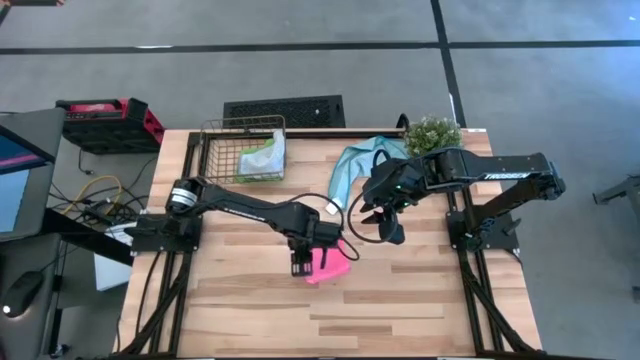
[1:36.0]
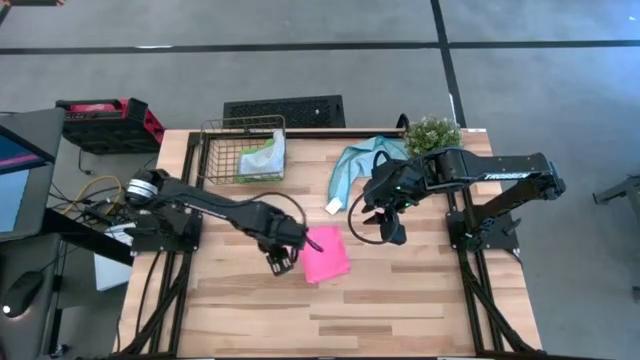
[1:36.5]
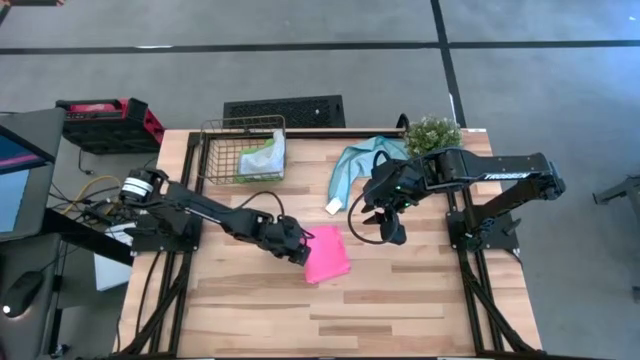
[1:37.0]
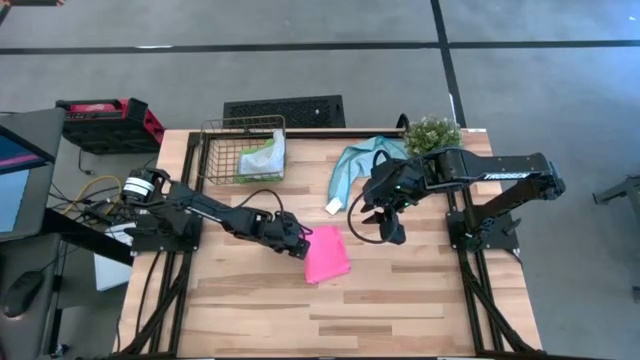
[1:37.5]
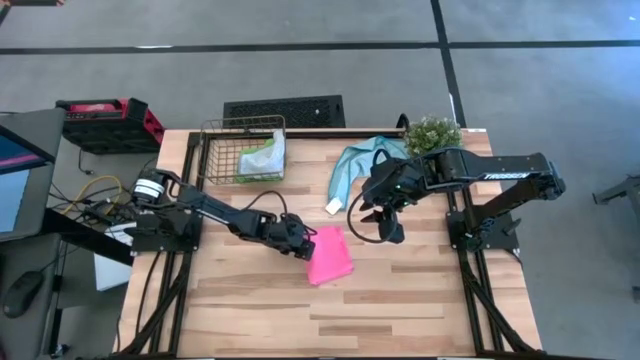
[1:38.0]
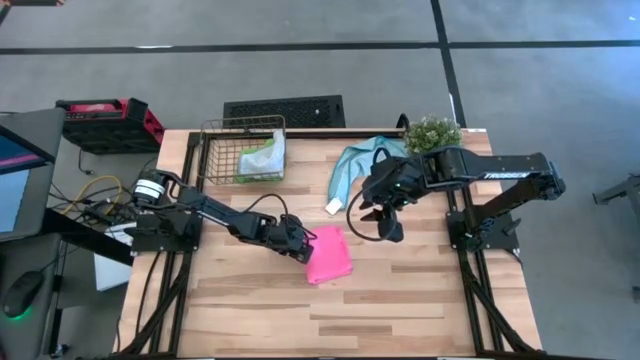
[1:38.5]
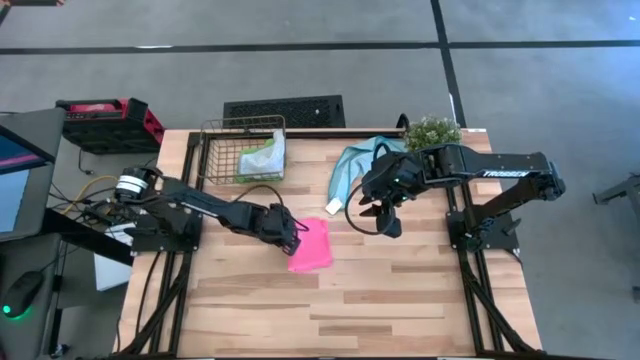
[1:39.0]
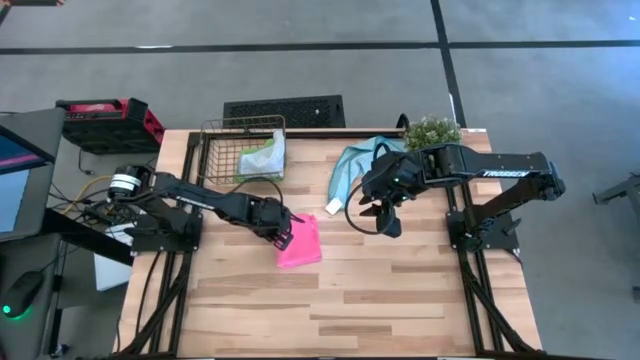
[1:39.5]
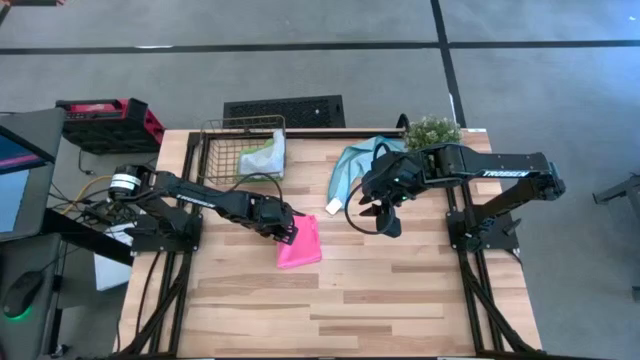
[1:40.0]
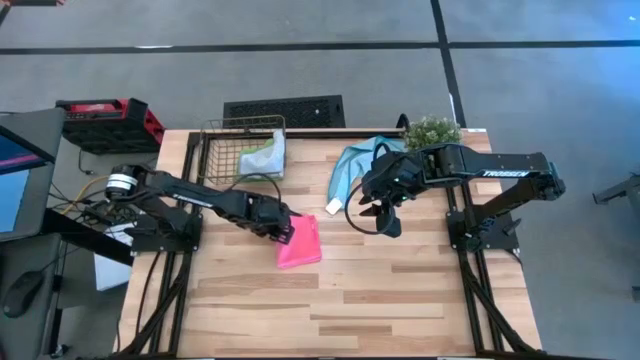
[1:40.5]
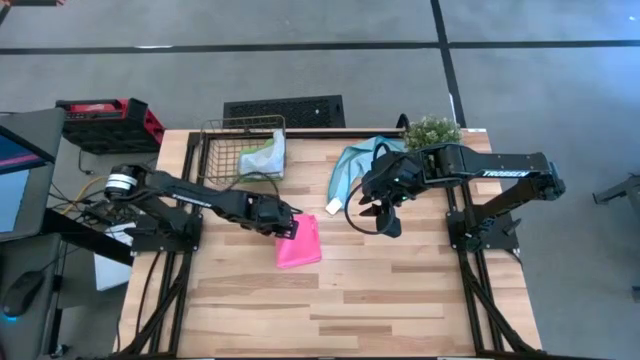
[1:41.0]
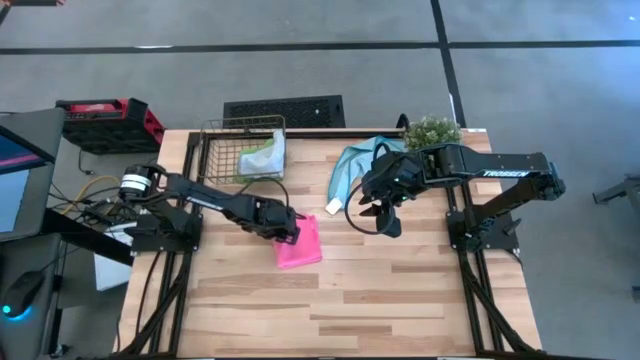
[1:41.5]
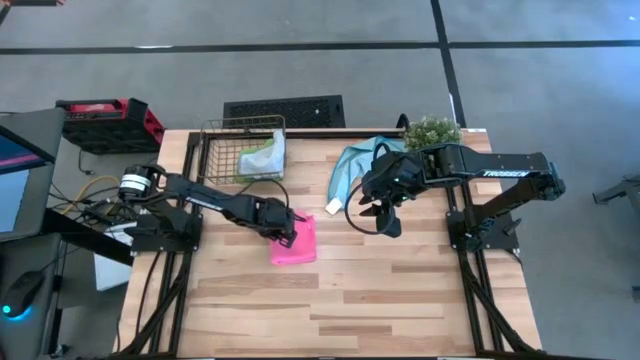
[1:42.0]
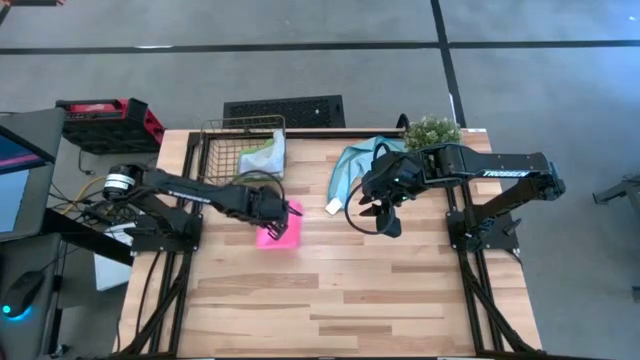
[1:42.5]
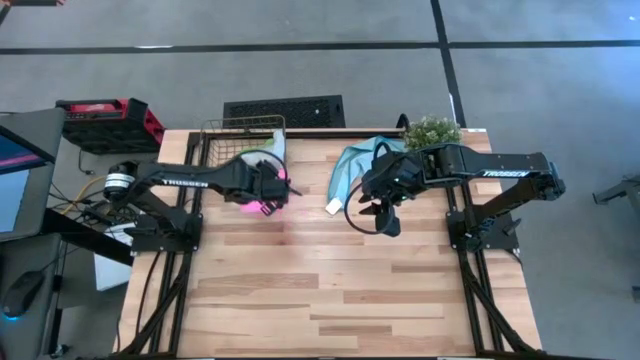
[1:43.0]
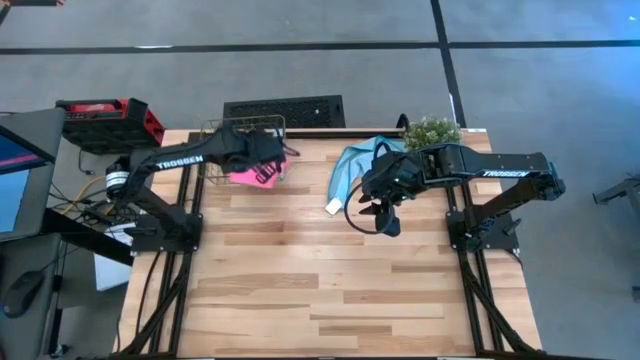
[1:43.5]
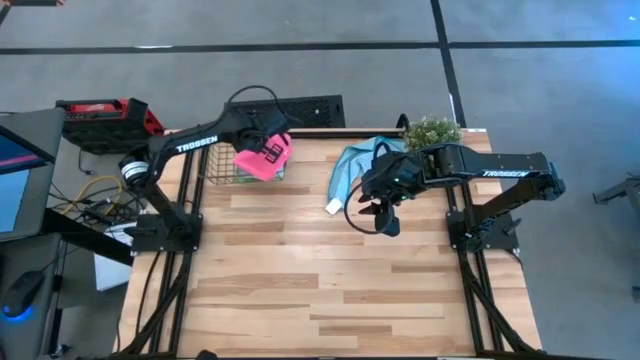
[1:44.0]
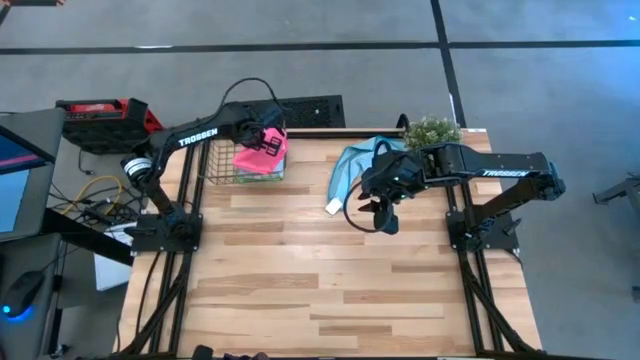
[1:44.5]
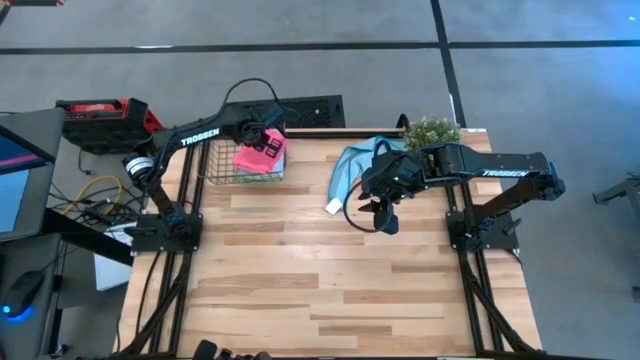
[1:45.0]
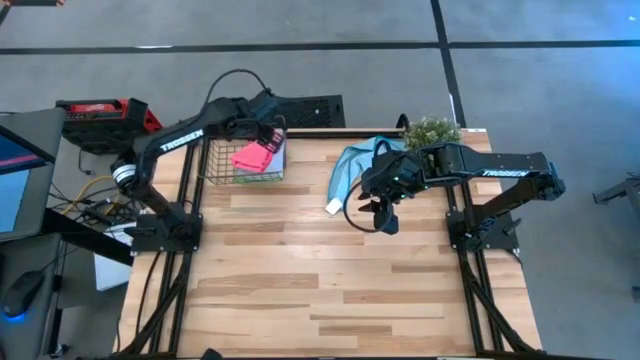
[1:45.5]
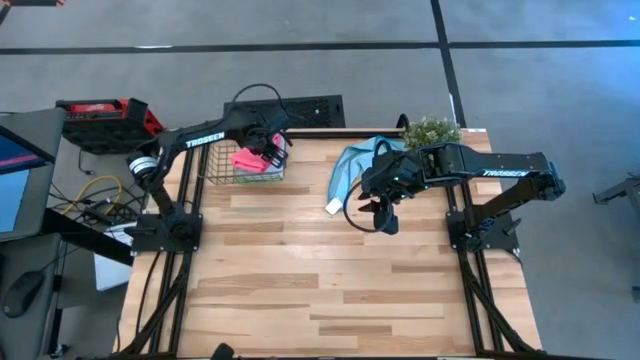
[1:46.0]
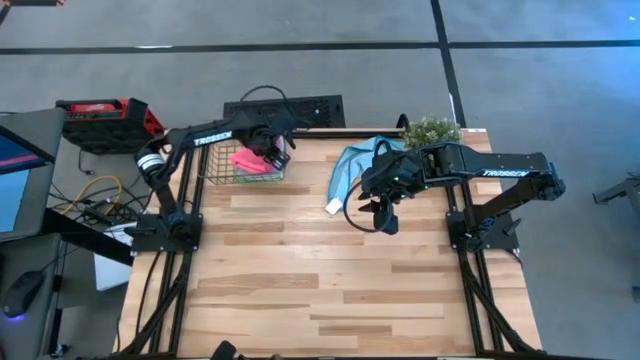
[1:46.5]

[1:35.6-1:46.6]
Task: Fold microfiber towels
Put the pink microfiber cloth into the gold wire basket

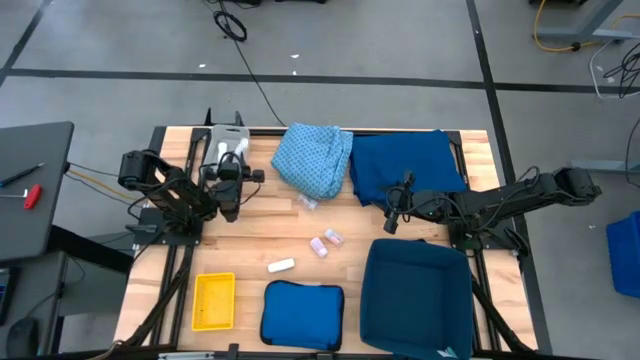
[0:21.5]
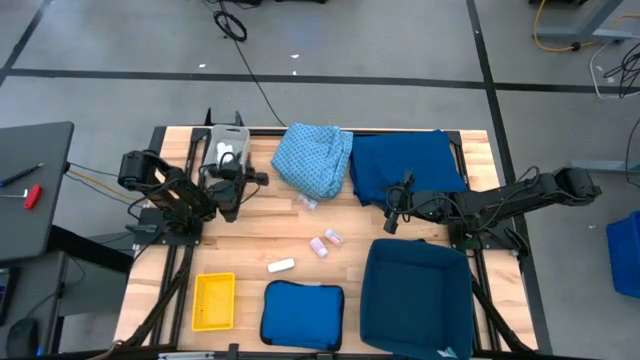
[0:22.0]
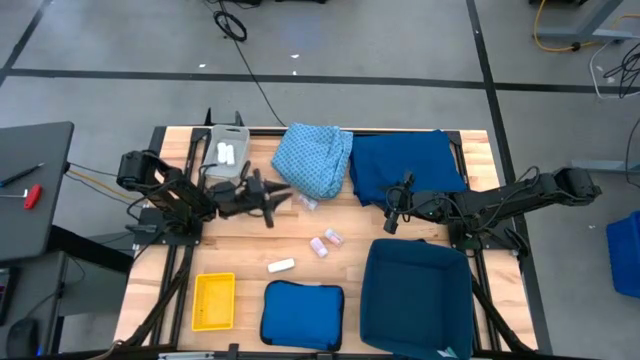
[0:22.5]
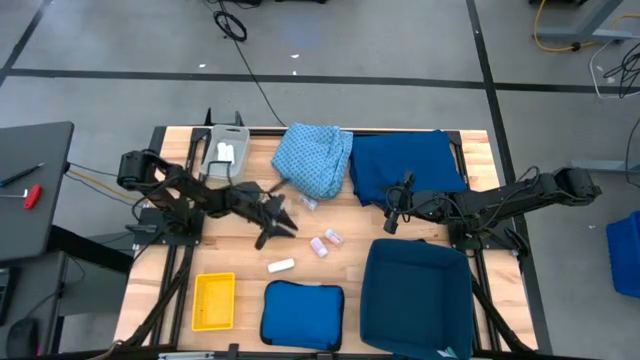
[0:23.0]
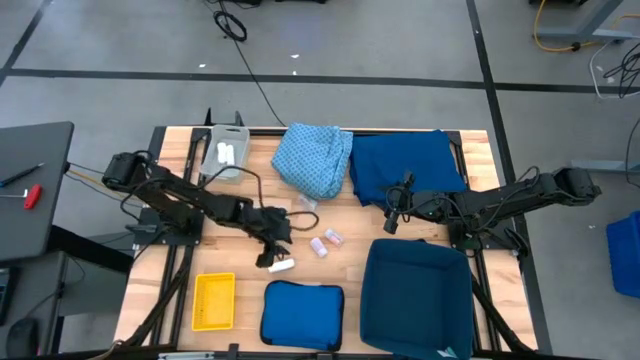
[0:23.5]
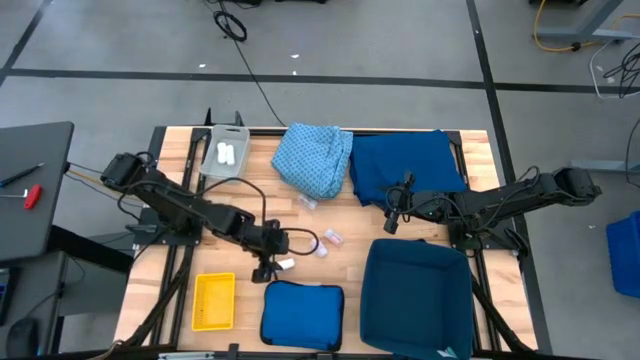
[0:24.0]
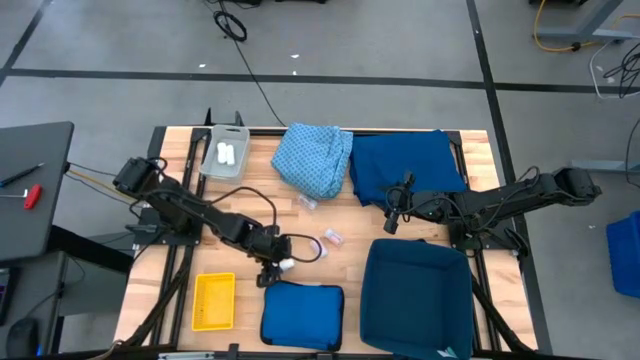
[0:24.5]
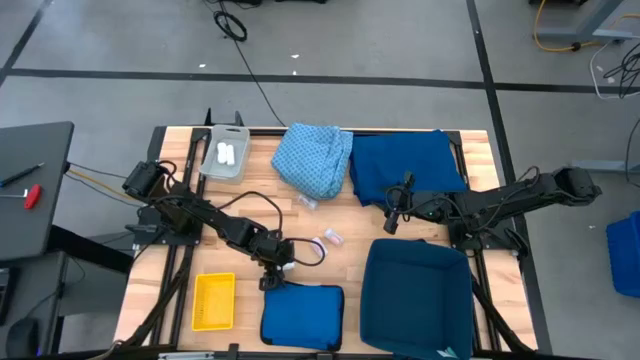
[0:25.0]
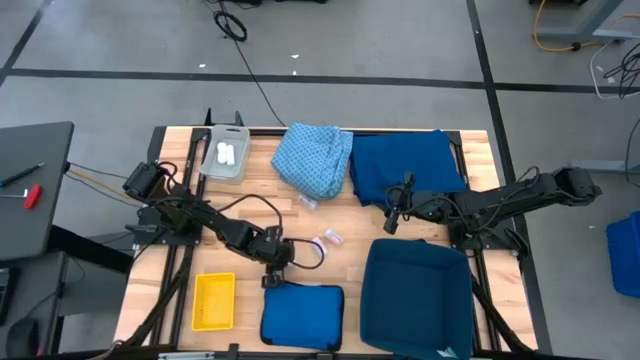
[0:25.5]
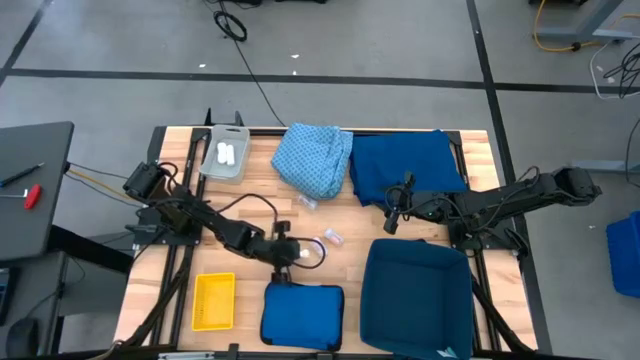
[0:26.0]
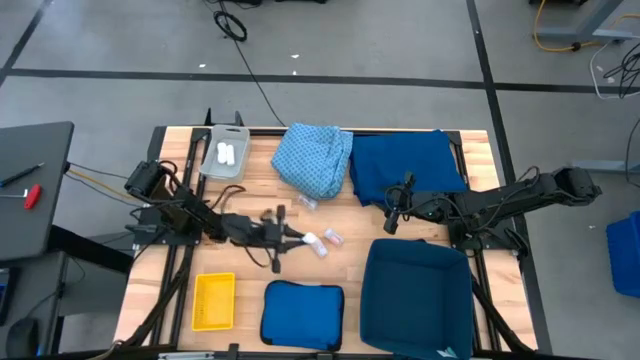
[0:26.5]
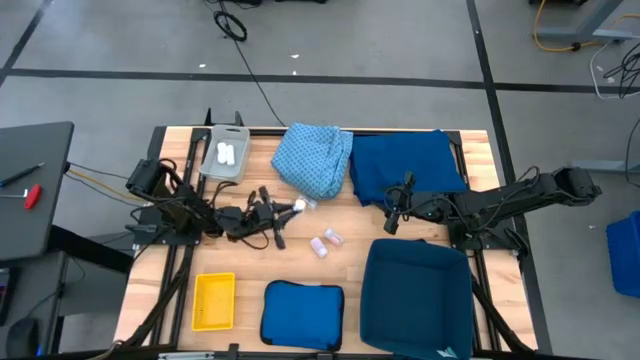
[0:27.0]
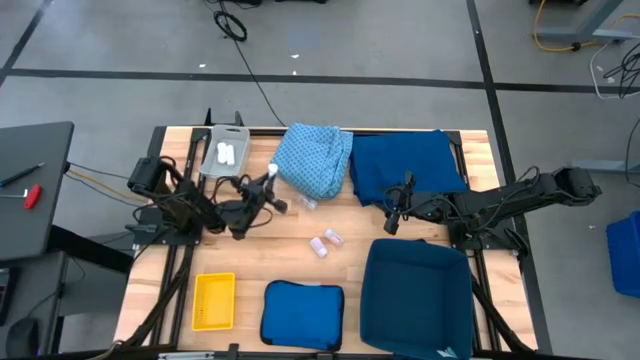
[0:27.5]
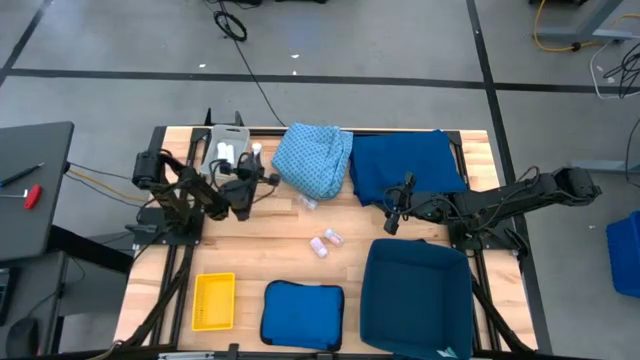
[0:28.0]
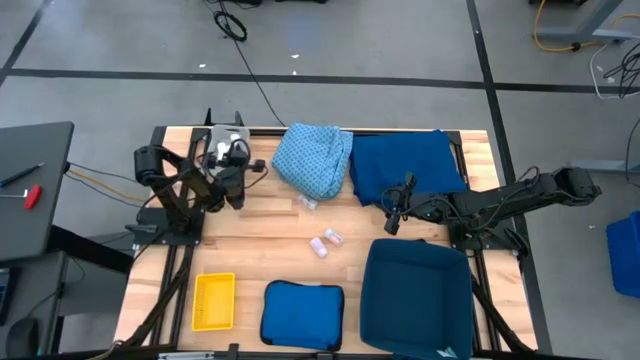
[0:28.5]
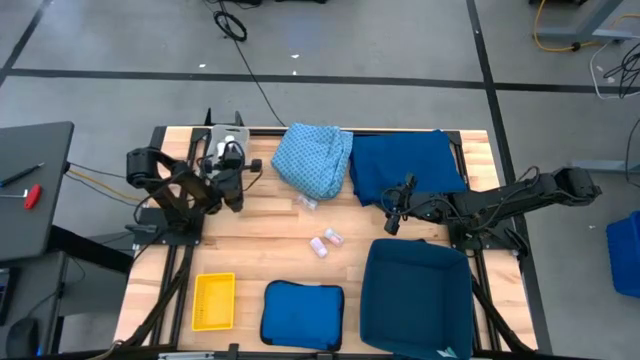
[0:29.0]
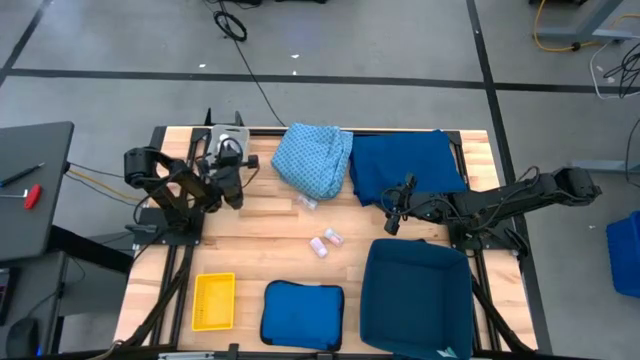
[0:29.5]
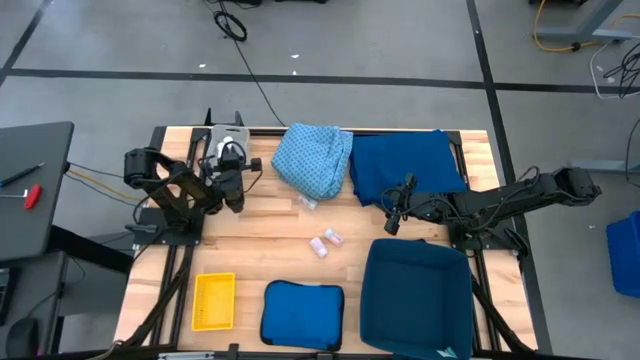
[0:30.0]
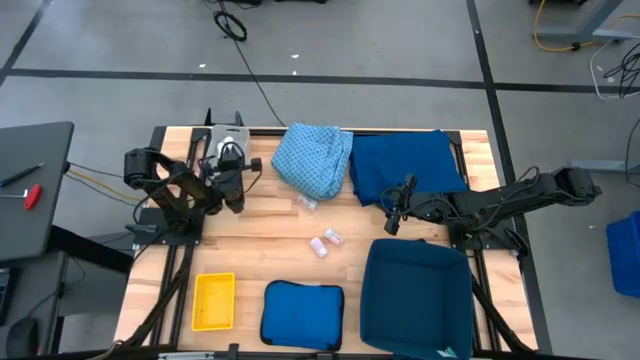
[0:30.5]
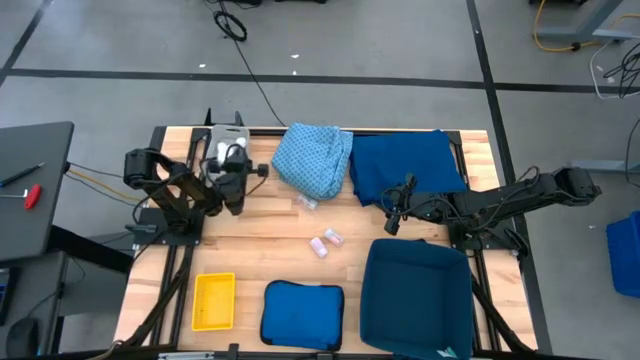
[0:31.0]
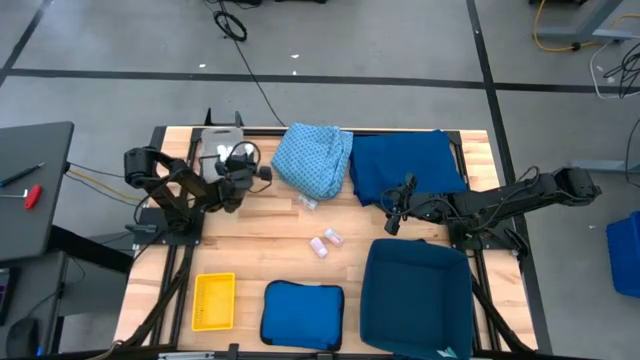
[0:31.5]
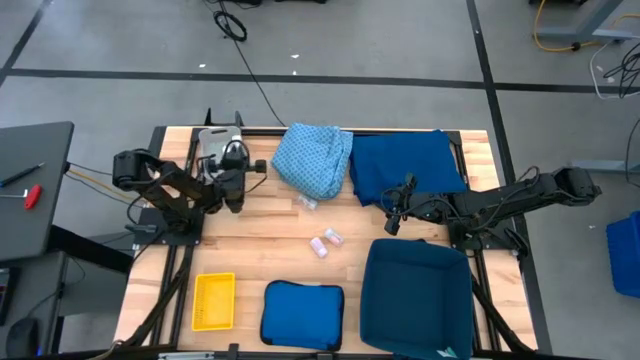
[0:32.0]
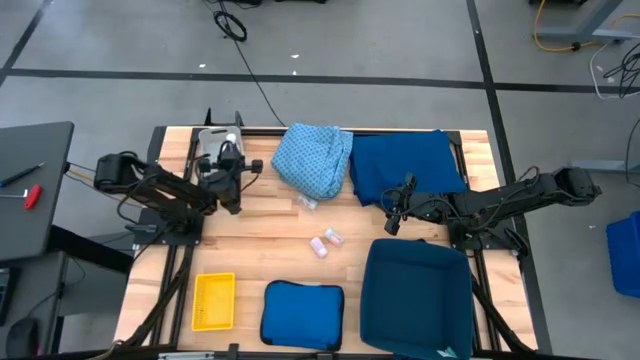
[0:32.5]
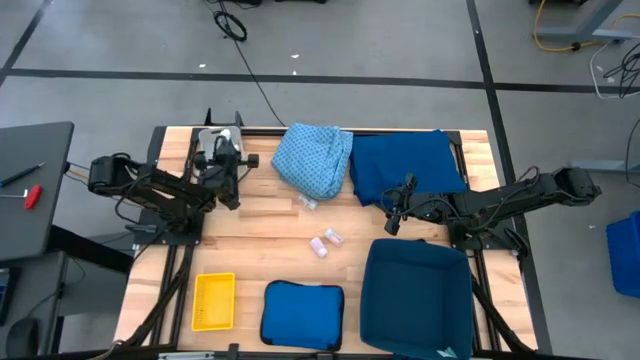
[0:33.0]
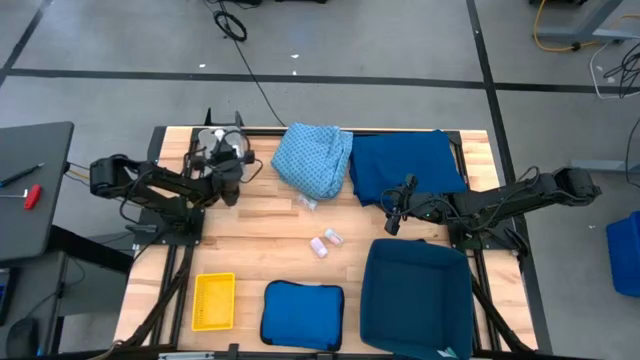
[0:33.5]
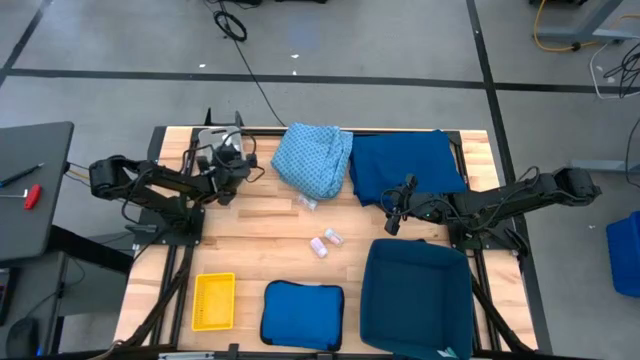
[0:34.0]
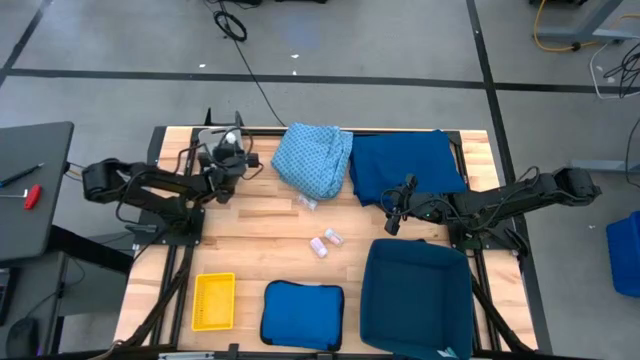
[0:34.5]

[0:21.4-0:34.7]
Task: Pick & place medical supplies in basket/bin
Put the white rolled gauze into the gray bin
